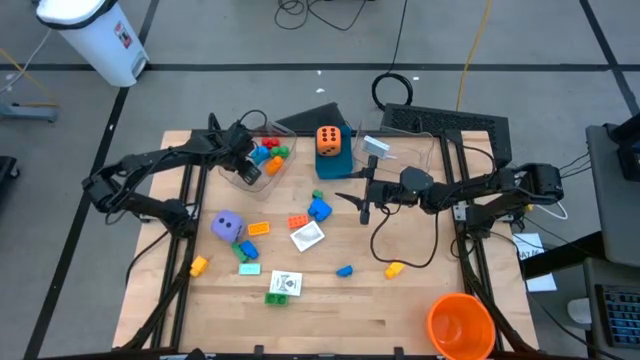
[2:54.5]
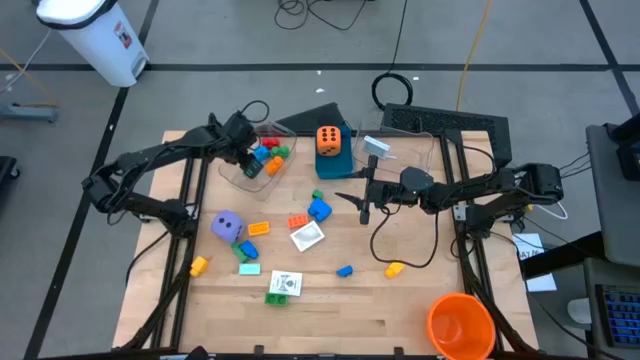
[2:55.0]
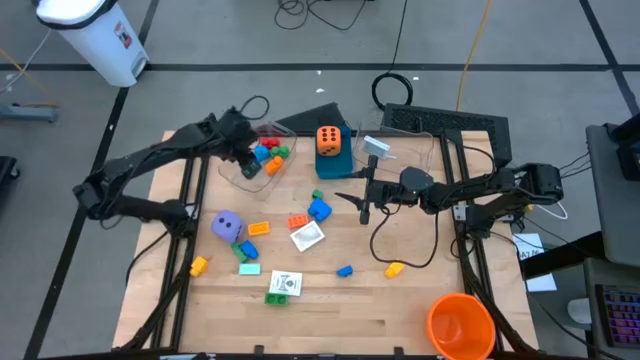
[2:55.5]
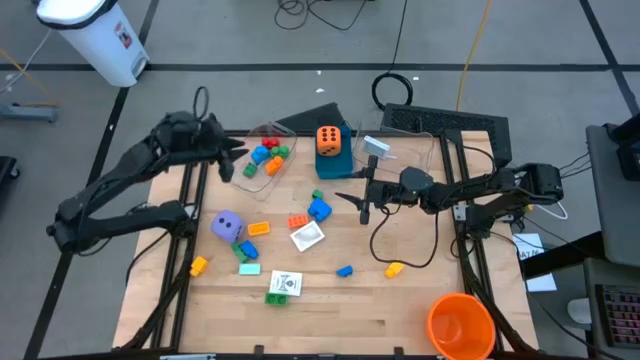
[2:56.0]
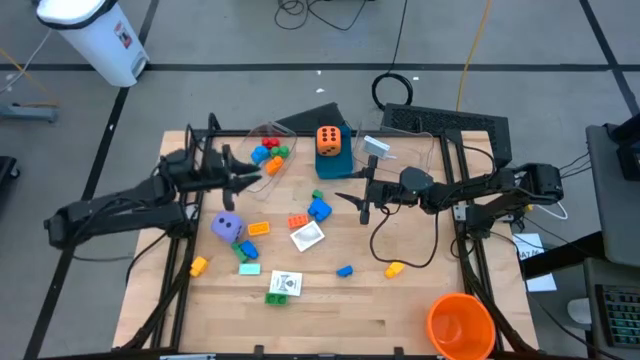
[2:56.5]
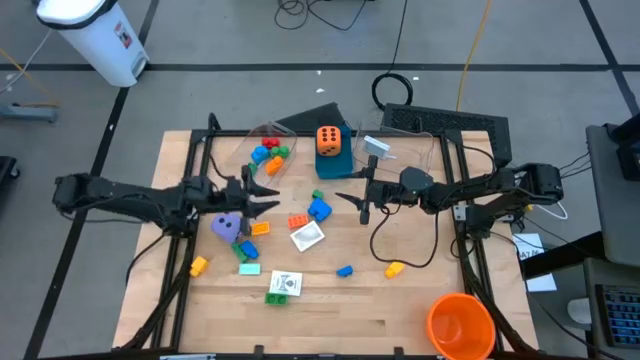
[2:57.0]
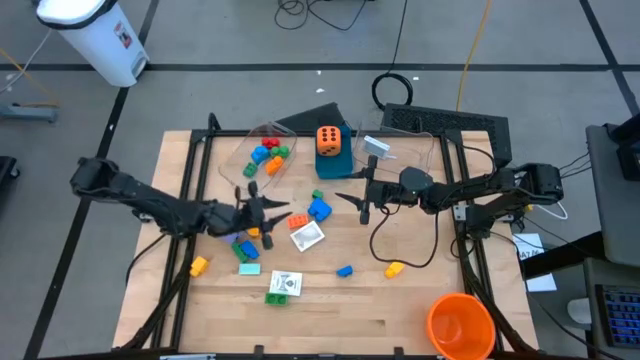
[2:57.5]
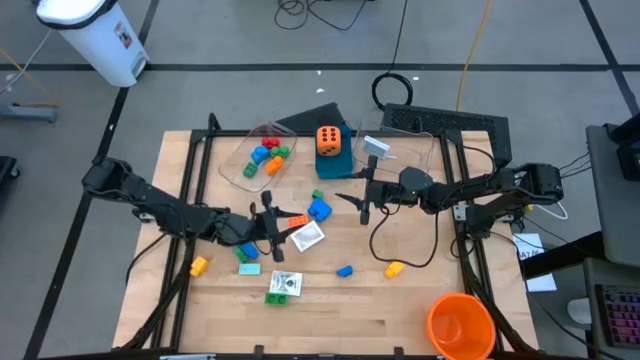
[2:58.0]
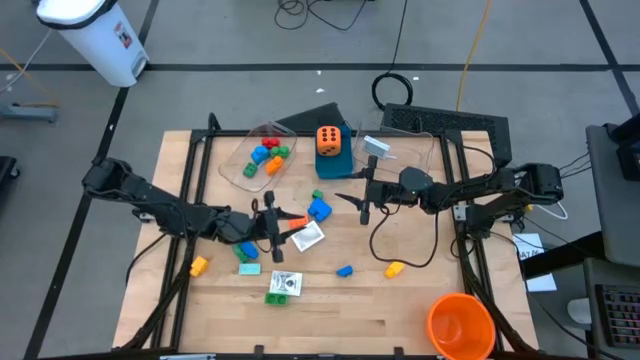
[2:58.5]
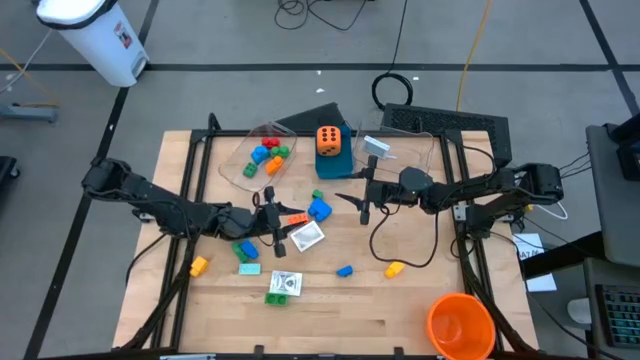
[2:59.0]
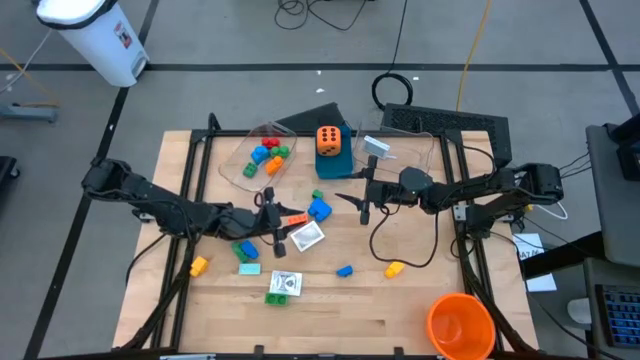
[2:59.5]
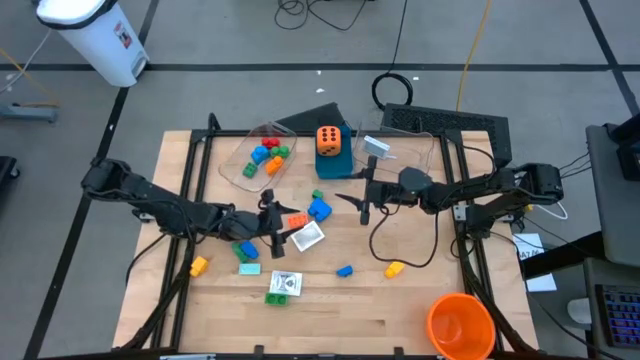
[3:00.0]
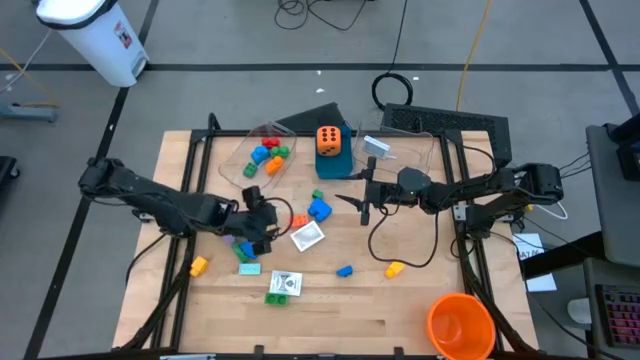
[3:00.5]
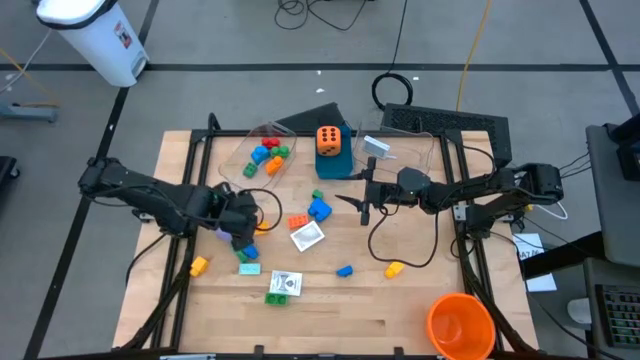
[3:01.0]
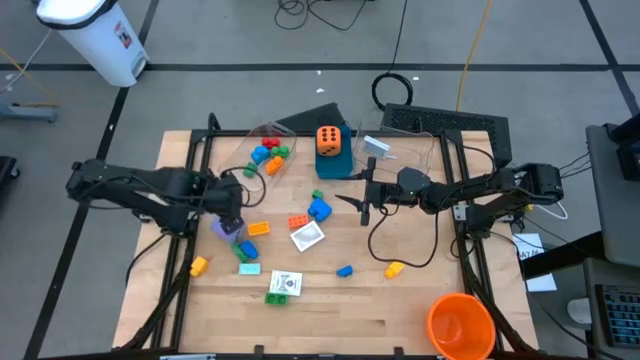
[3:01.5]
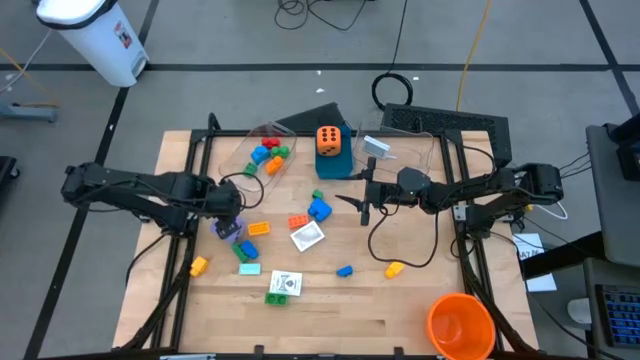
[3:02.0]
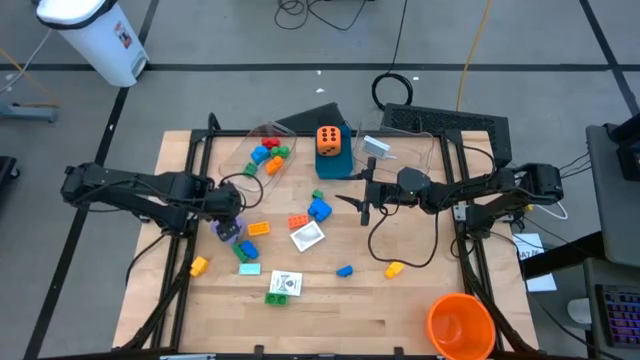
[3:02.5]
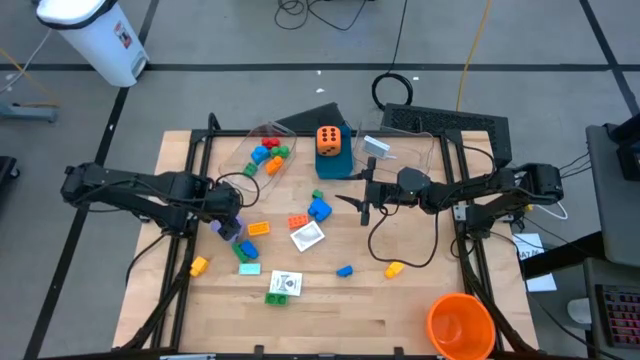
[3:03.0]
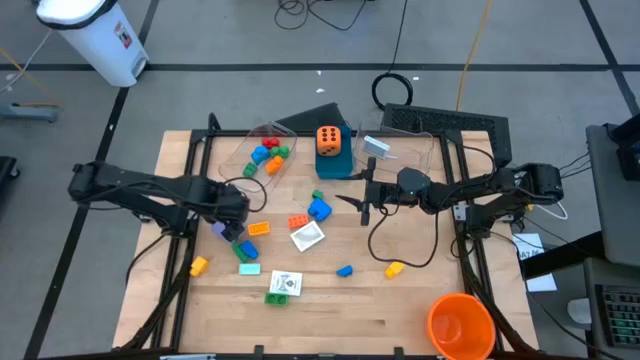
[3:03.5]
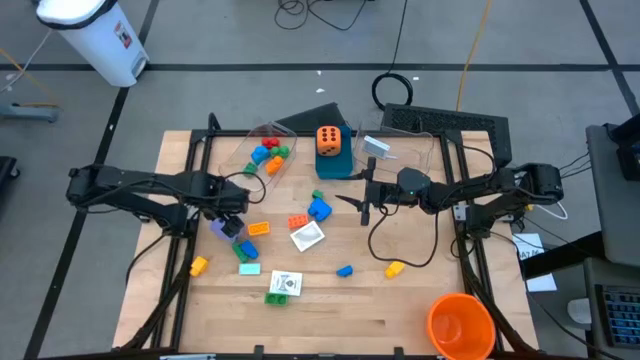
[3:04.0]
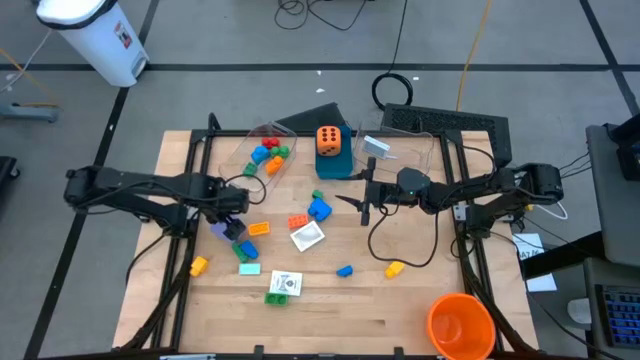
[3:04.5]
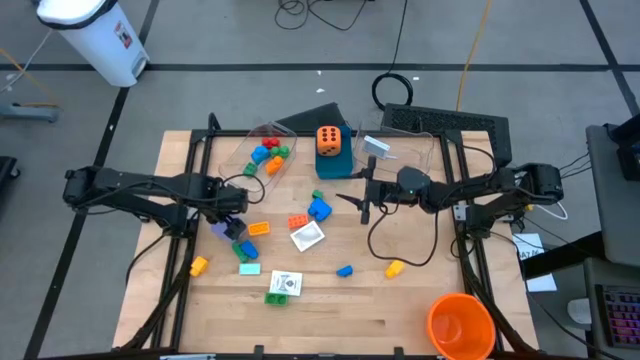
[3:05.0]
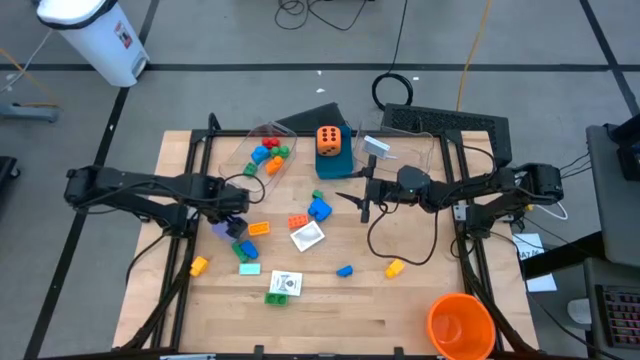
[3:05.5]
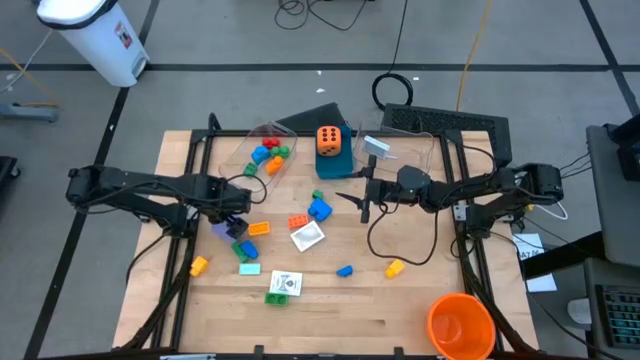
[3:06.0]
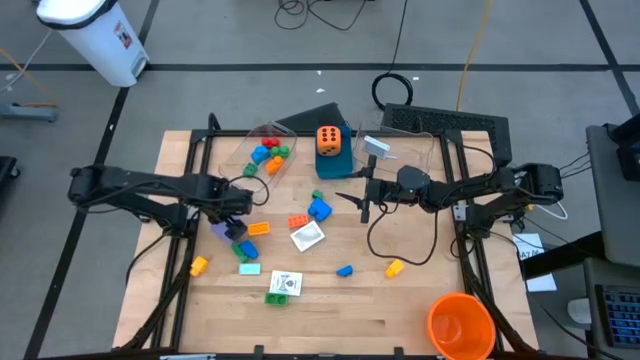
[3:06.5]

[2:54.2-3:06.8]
Task: Pick & Place Toys
Put the violet dice into the blue bin

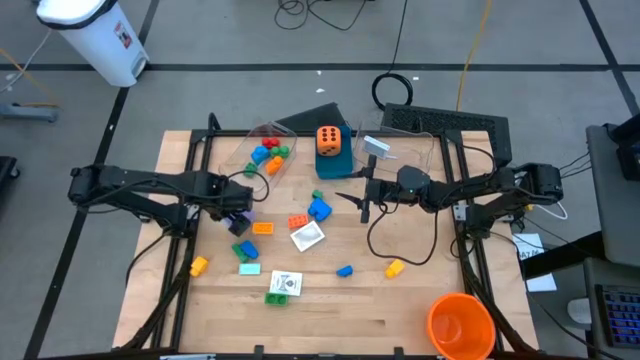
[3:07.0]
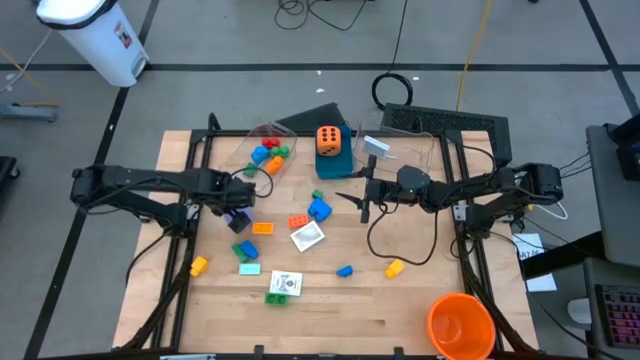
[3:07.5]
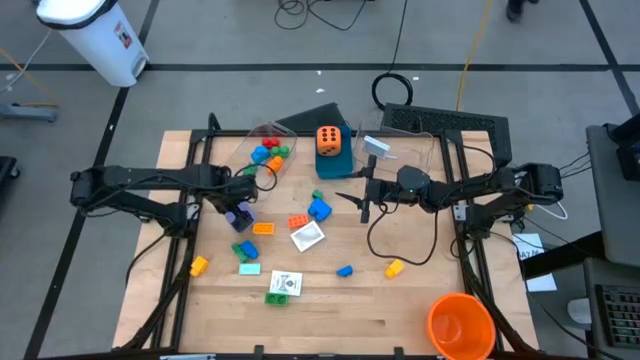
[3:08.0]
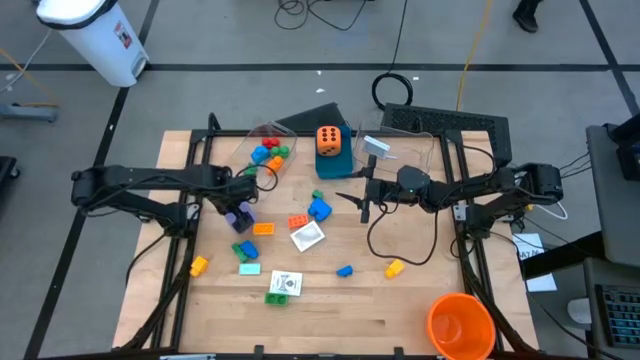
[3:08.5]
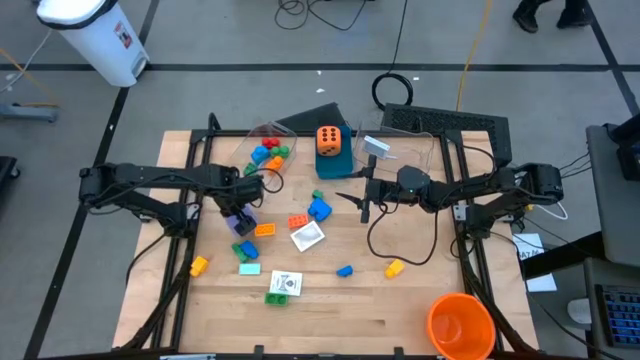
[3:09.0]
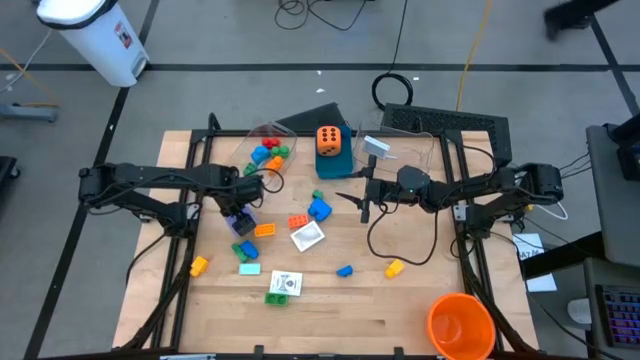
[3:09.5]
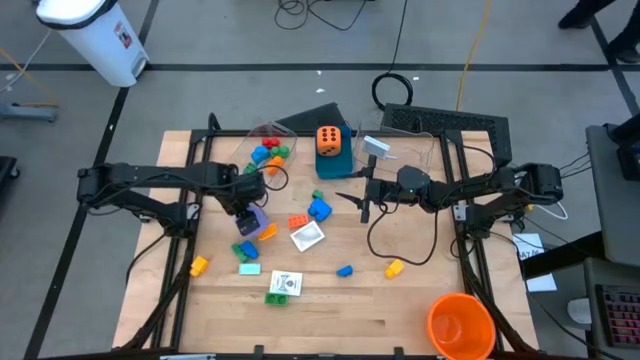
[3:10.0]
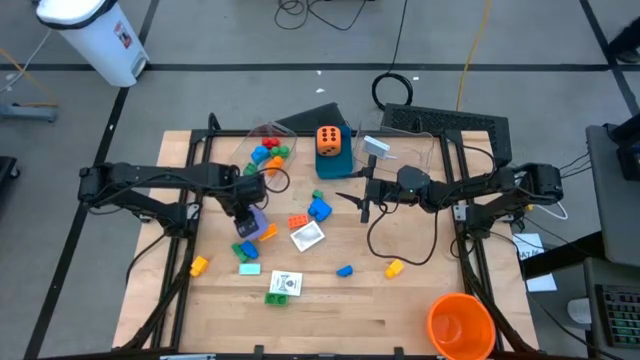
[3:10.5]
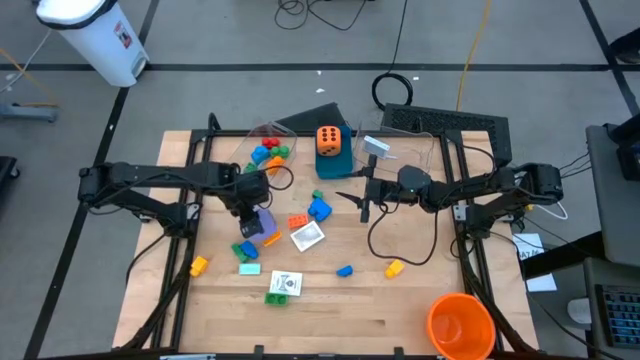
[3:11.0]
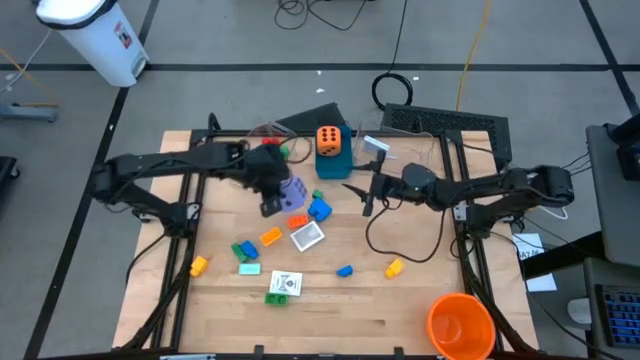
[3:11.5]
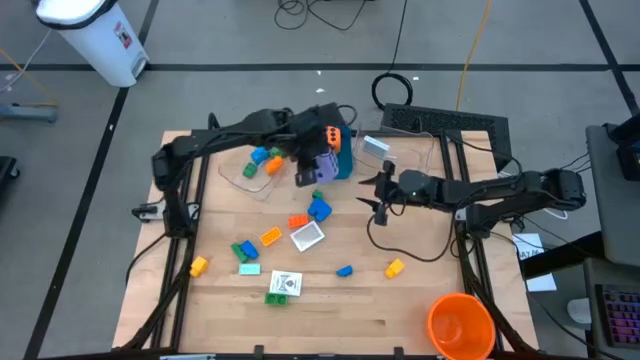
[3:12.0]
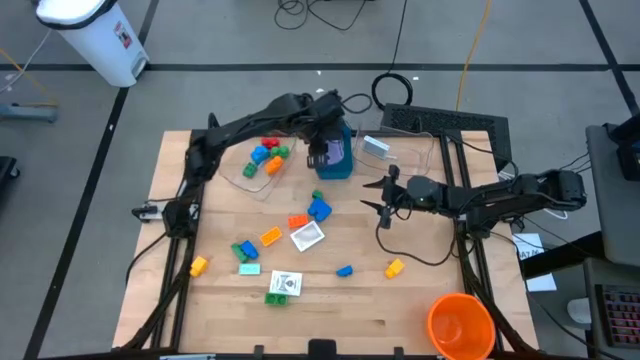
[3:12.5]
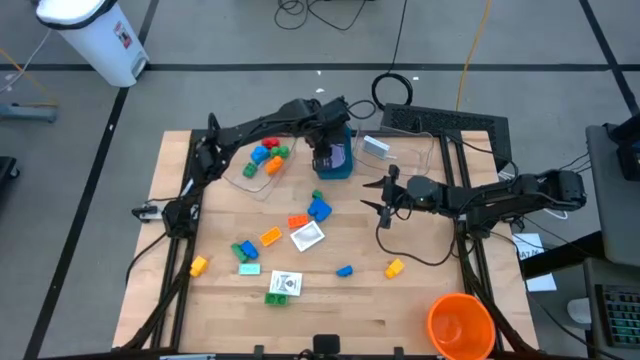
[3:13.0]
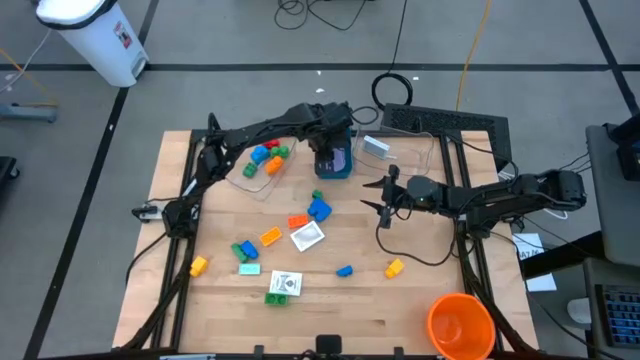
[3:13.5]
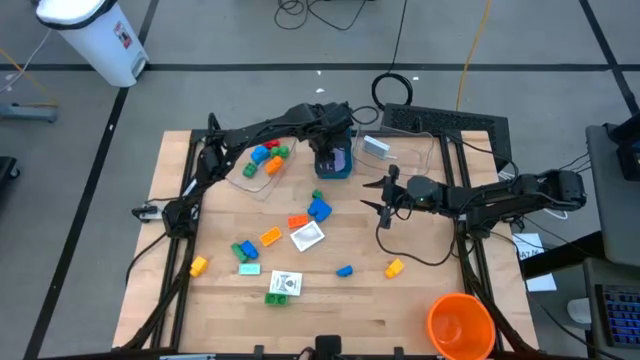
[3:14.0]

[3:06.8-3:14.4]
Put the violet dice into the blue bin

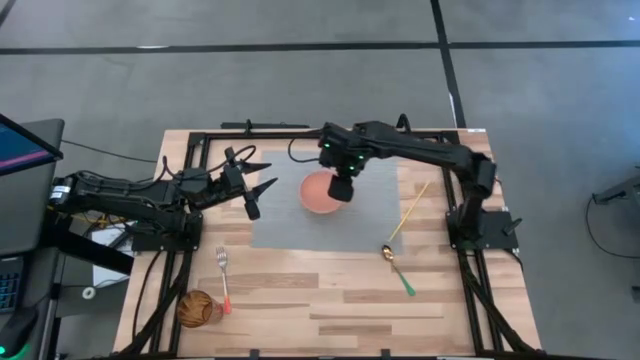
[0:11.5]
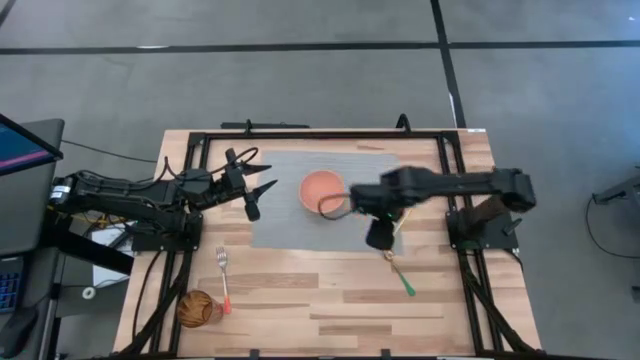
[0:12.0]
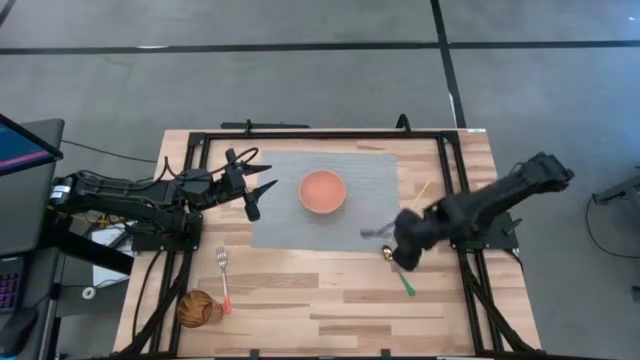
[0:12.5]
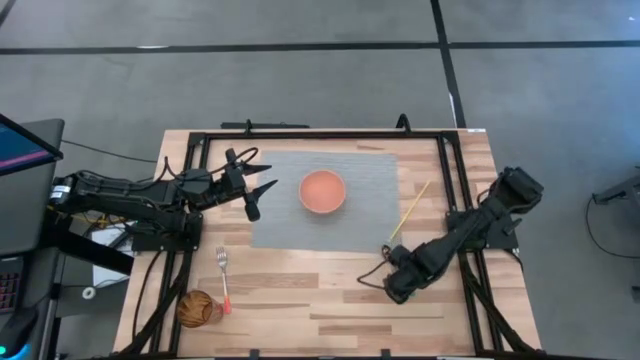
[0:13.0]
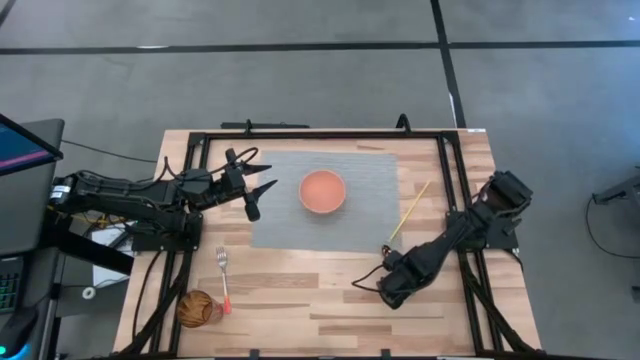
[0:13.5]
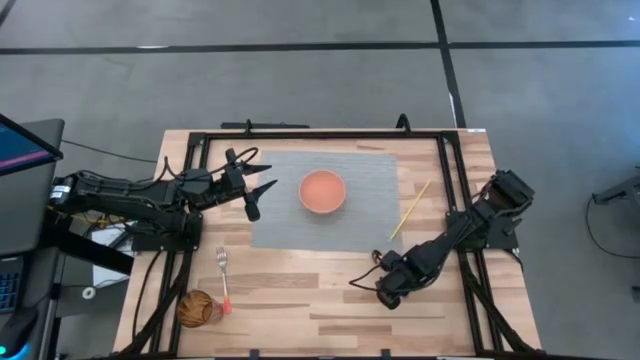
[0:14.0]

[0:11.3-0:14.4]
Task: Pick & Place Utensil
Put the green spoon into the orange bowl on the gray mat
